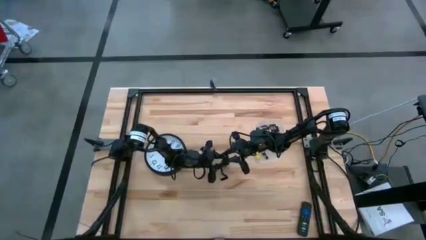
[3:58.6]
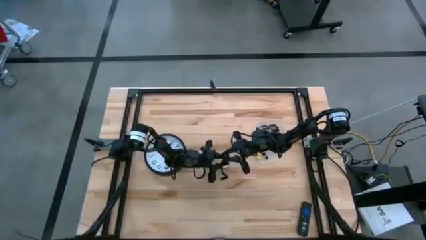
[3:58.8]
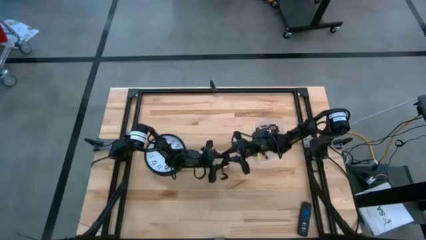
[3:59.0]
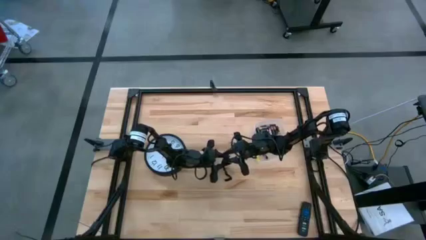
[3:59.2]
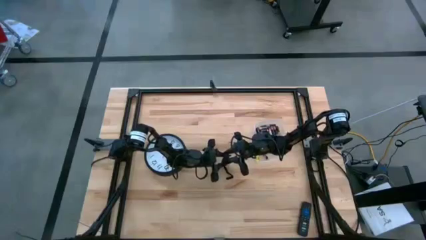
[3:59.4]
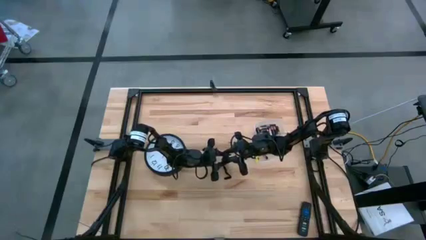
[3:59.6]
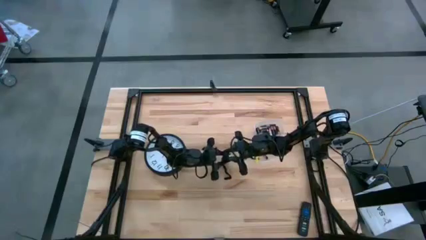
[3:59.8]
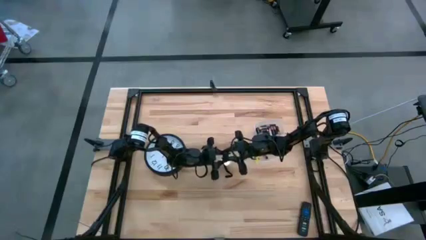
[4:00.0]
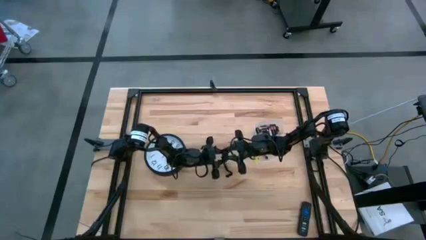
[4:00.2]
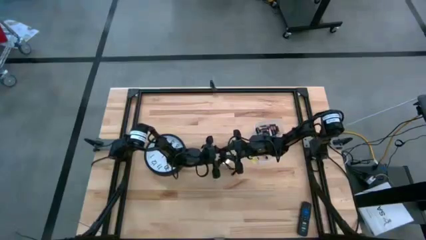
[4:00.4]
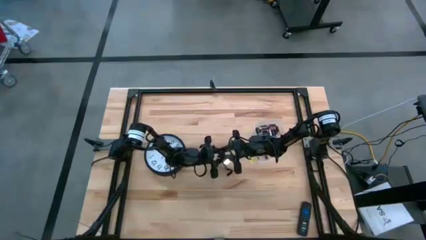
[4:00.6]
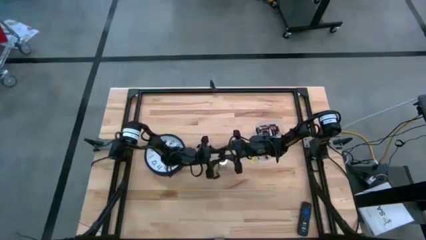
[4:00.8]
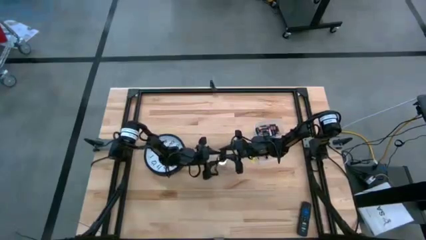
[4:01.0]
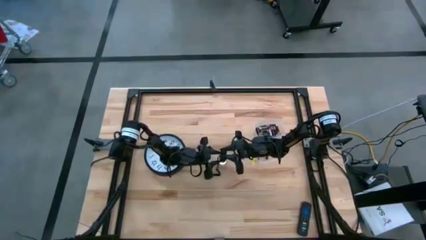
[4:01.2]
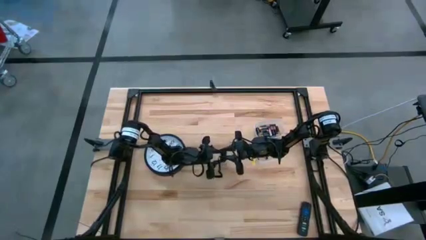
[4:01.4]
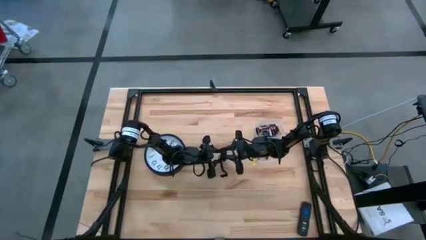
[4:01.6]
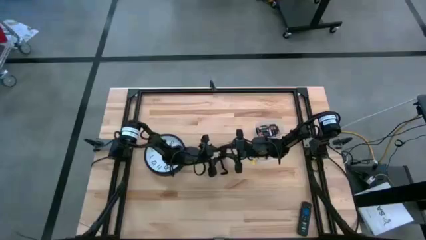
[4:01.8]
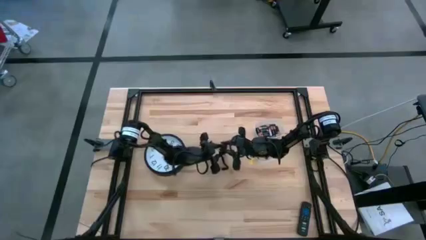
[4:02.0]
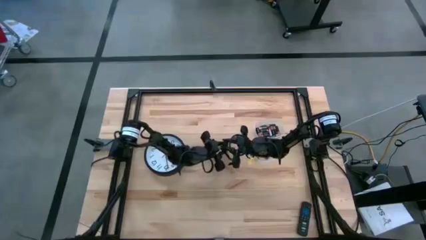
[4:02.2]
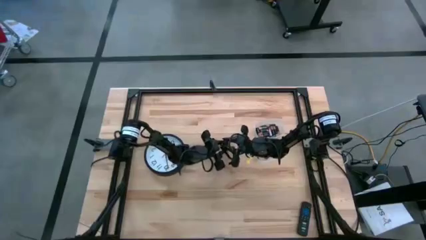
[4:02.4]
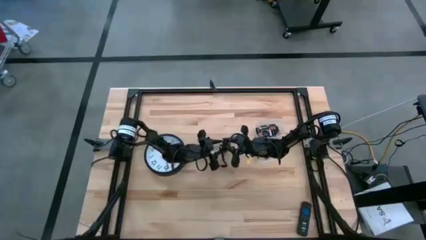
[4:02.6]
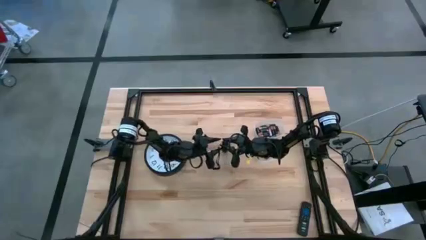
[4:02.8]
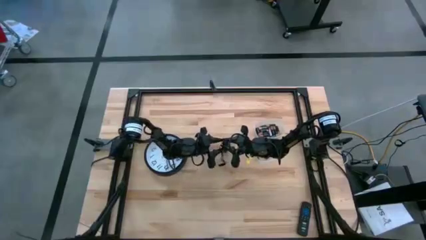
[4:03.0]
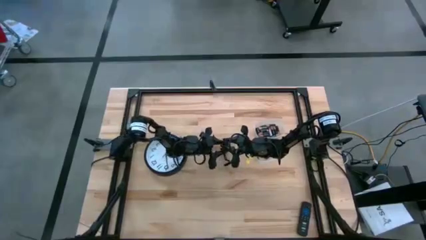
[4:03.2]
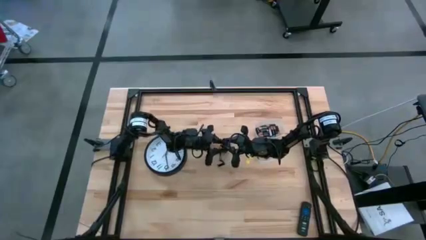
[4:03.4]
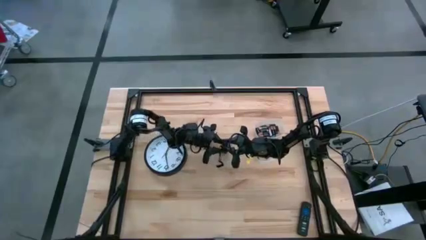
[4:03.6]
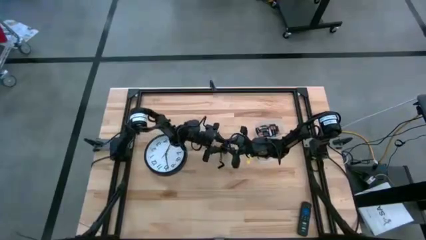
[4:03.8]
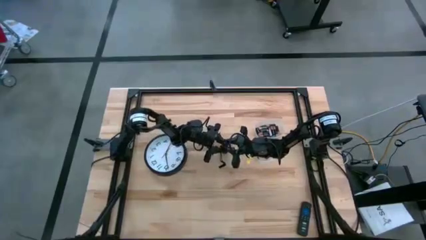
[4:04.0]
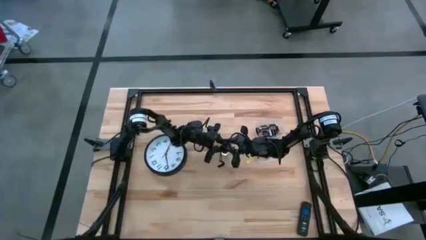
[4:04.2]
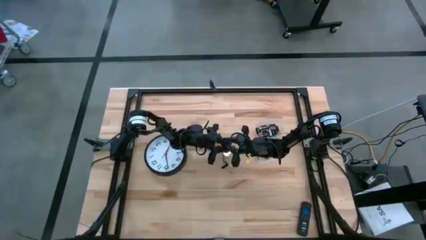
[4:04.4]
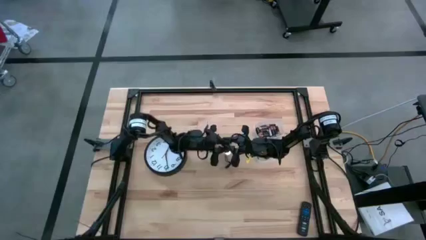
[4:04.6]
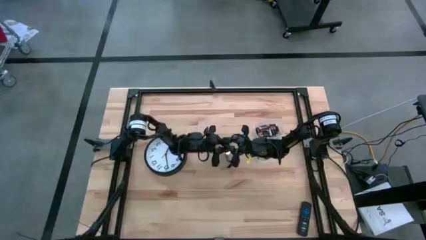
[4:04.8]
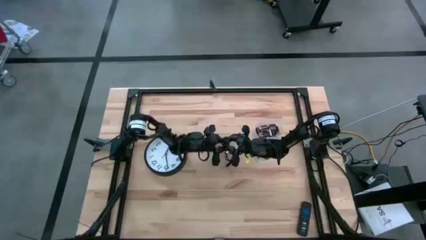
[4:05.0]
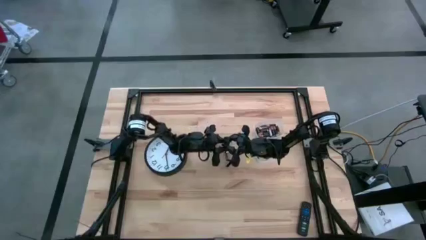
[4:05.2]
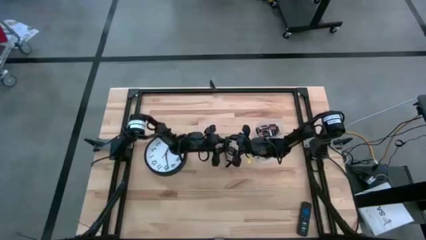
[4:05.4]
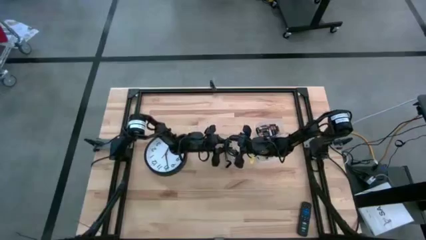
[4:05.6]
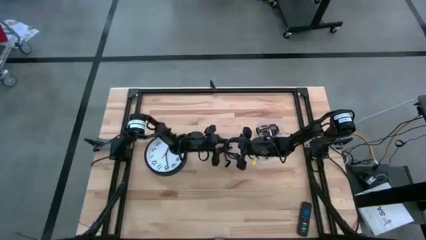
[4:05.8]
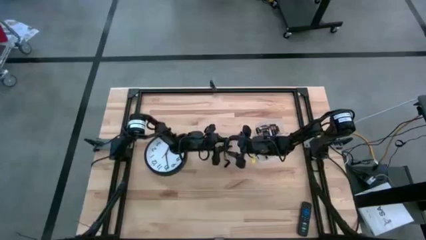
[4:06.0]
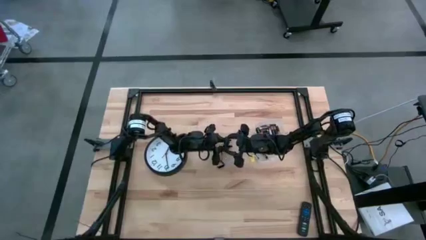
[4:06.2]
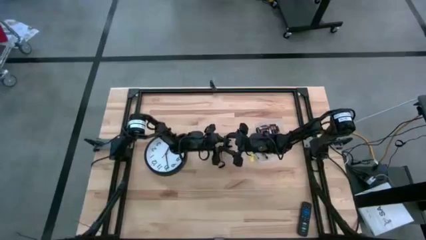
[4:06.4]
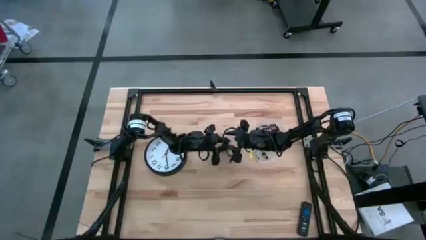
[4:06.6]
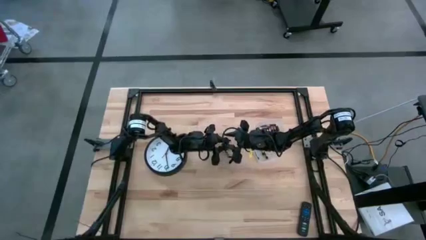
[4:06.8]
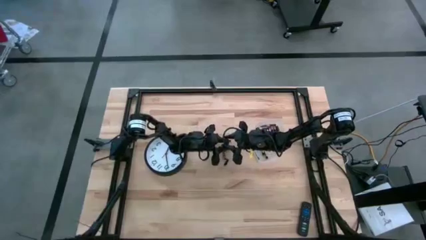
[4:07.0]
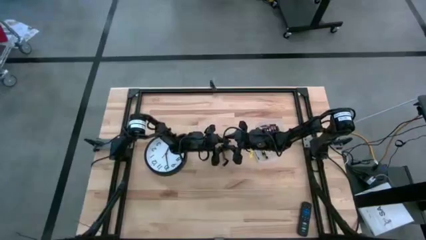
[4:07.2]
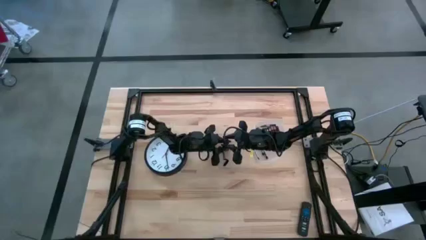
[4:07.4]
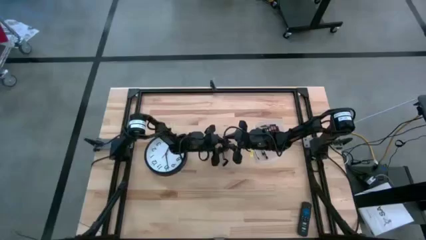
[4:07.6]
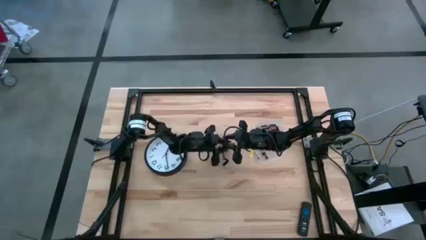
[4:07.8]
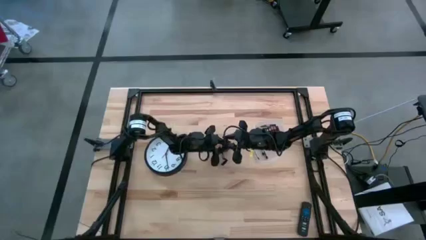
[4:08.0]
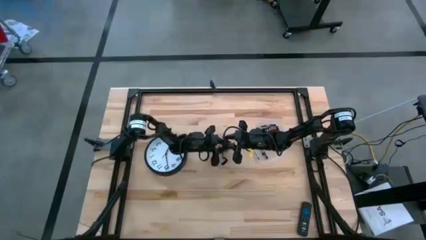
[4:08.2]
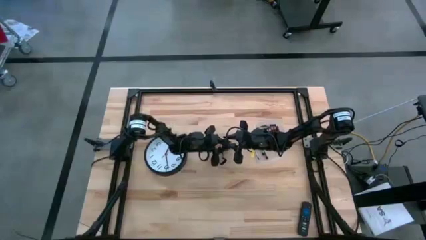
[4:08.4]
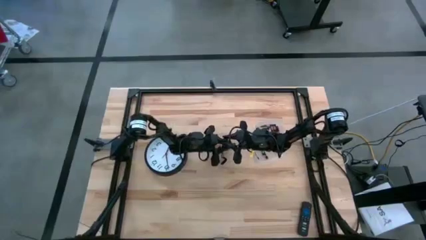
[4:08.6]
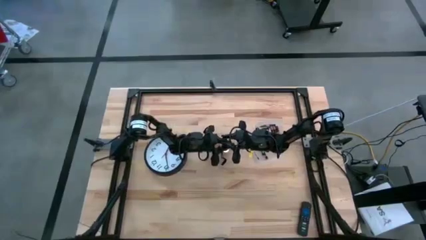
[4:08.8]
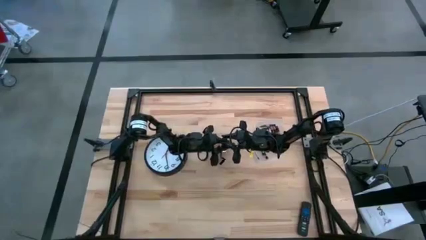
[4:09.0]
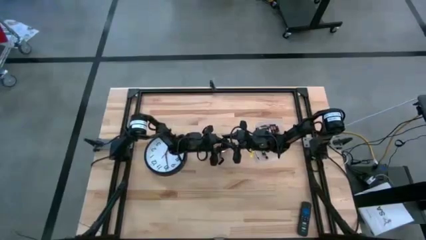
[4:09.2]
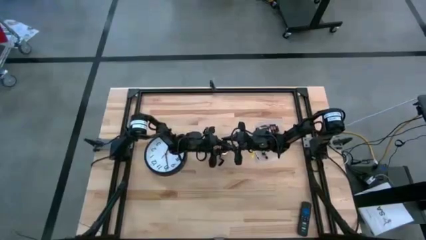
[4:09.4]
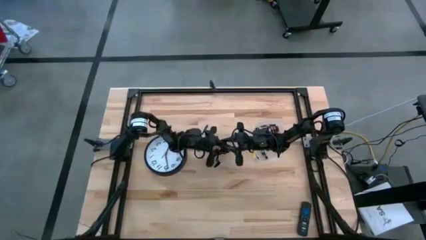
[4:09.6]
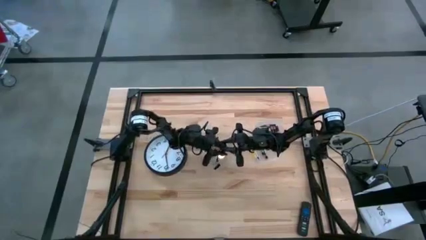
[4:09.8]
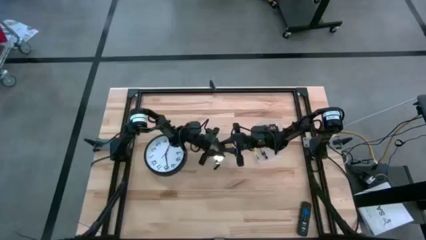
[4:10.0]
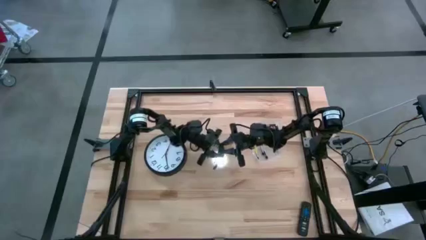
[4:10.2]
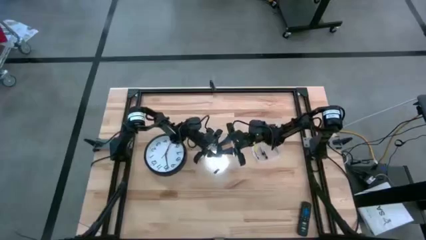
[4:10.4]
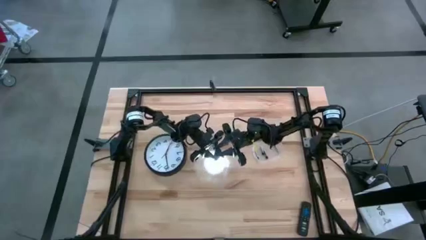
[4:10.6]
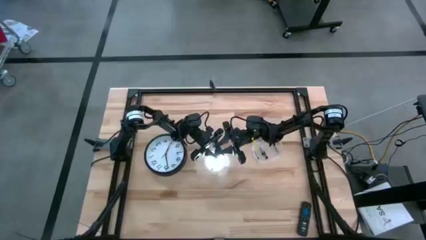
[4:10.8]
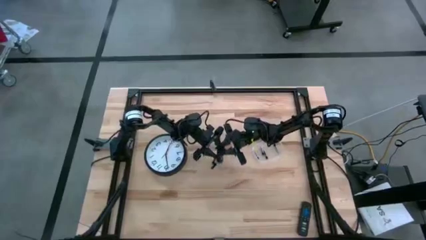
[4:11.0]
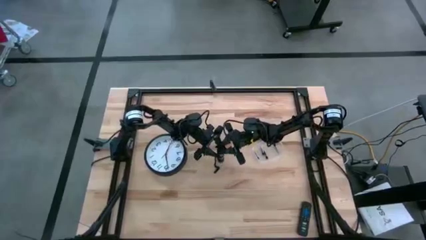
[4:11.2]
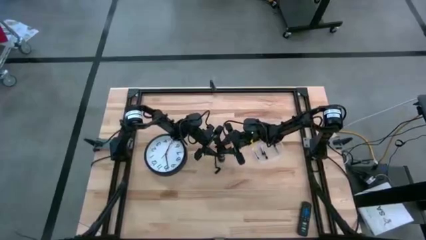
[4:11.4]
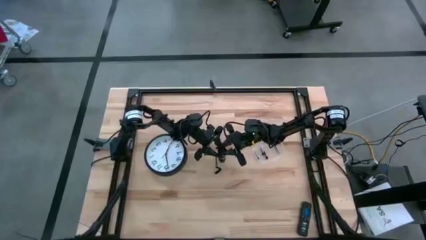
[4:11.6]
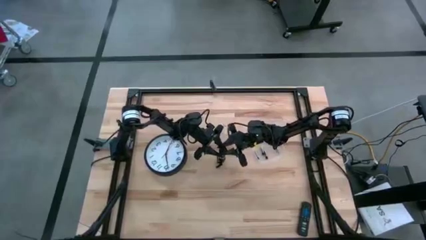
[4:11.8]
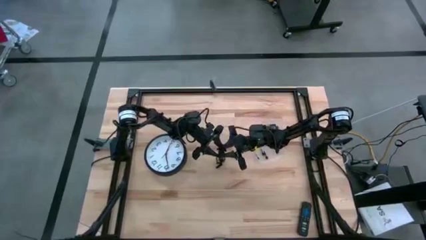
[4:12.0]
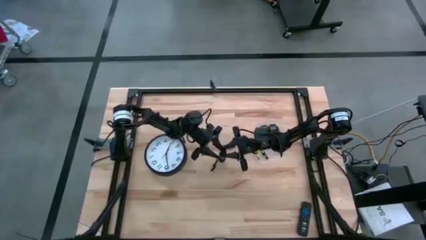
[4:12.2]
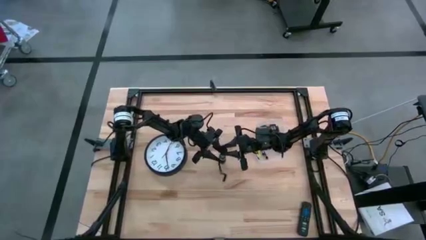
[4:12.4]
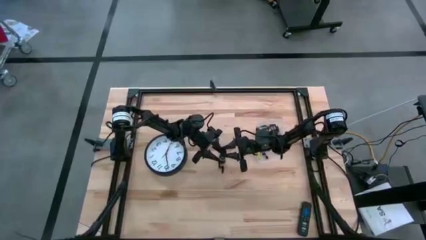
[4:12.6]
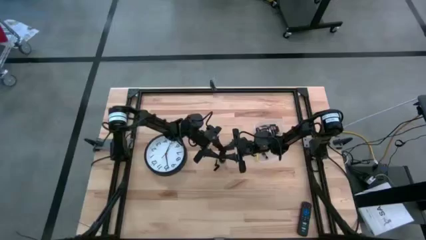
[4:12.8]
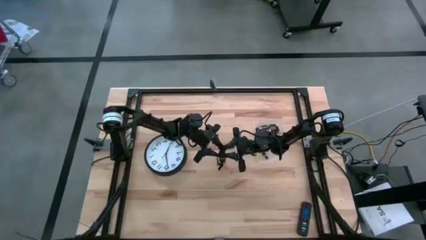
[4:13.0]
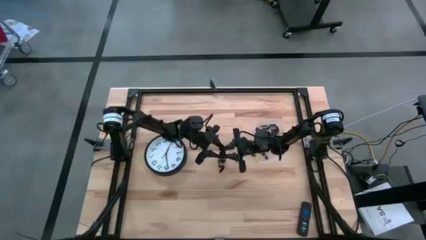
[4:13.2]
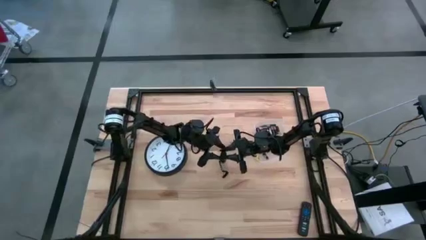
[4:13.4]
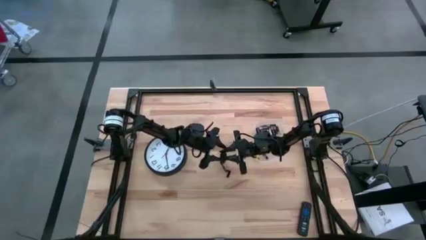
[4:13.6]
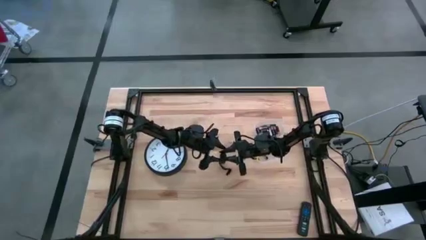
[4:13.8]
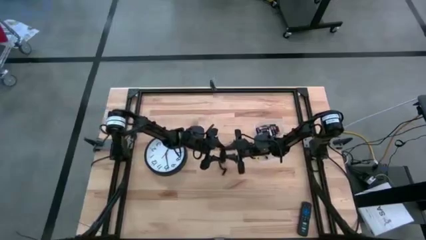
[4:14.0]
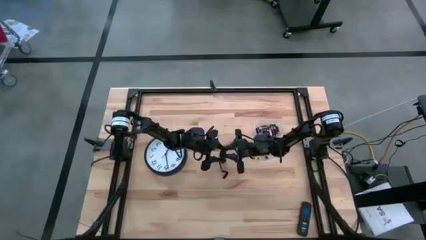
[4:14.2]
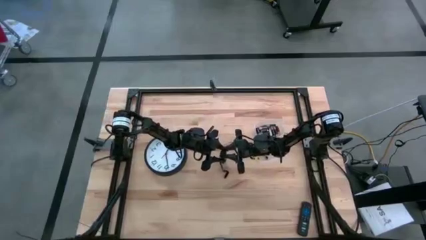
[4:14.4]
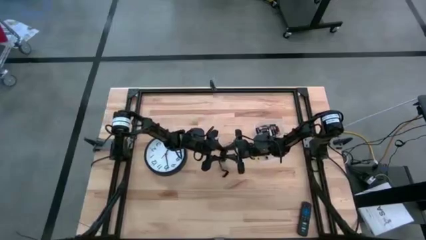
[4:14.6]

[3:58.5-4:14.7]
Task: Insert battery
Close the black battery compartment
